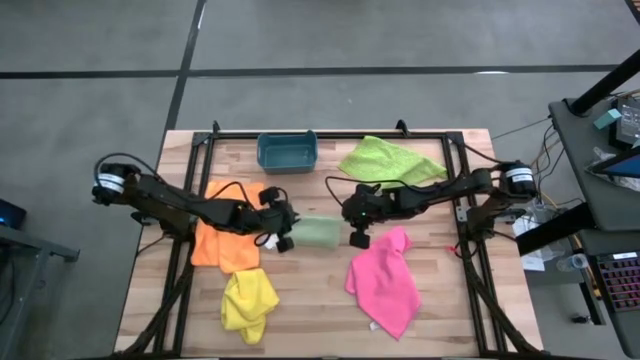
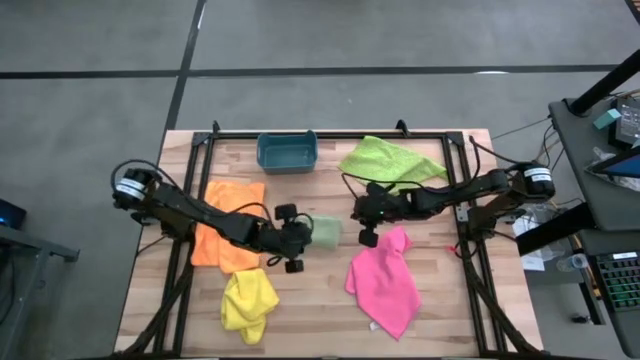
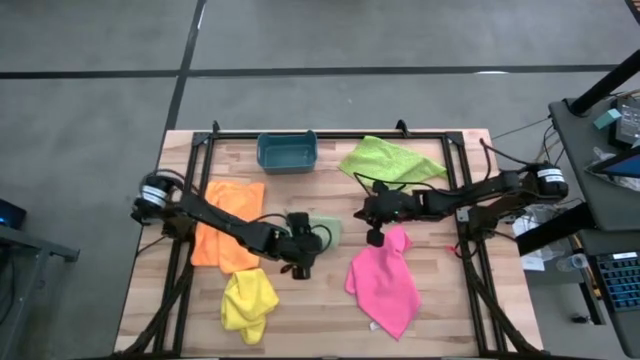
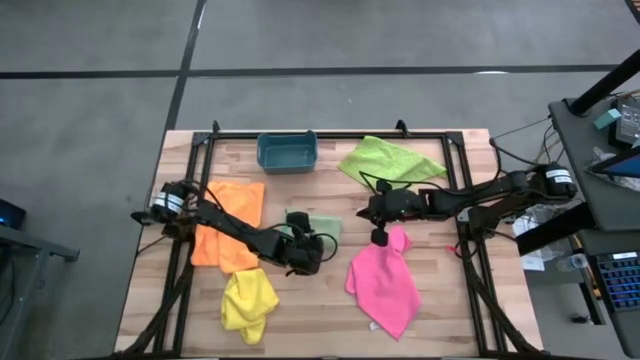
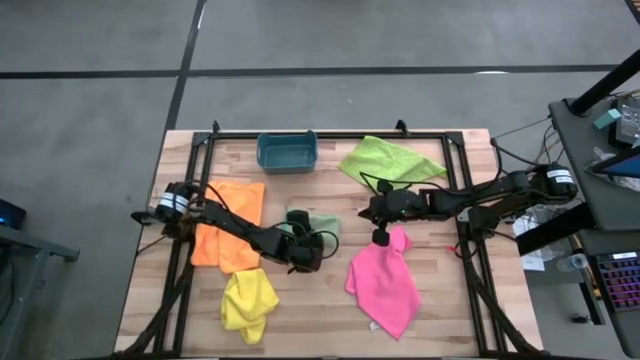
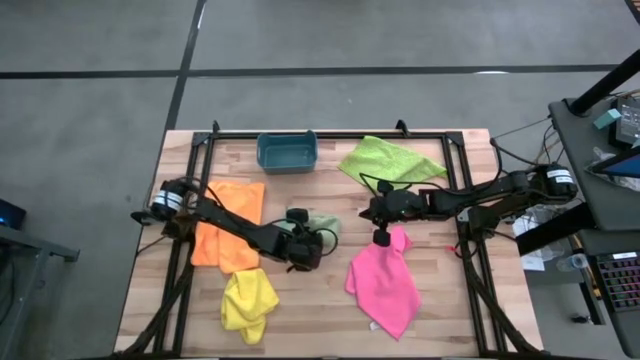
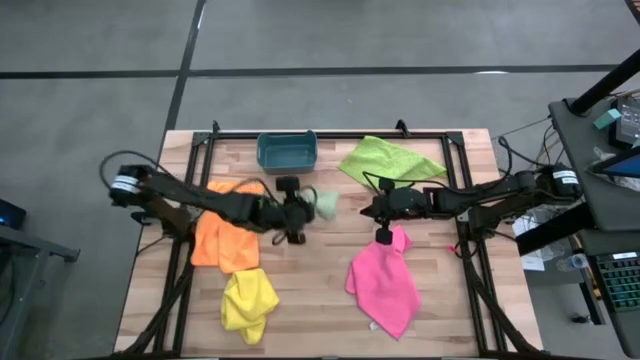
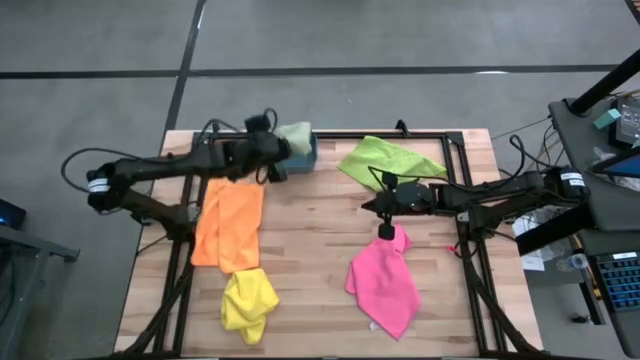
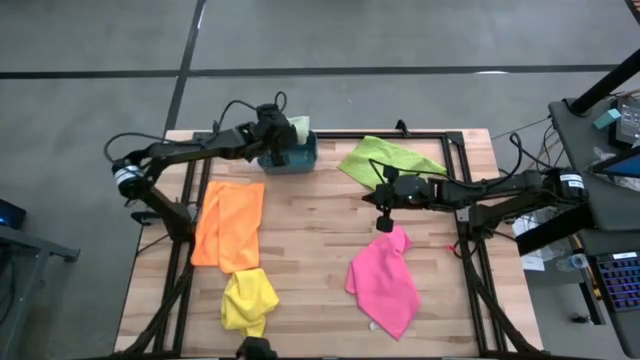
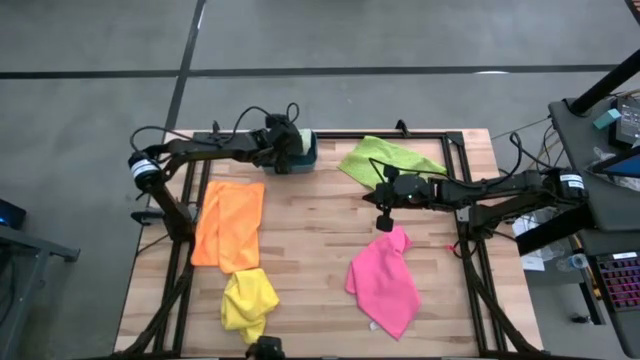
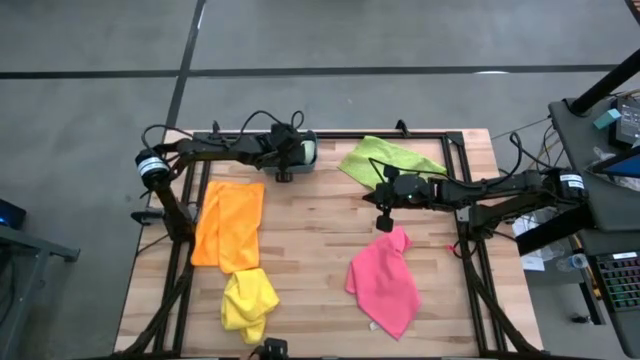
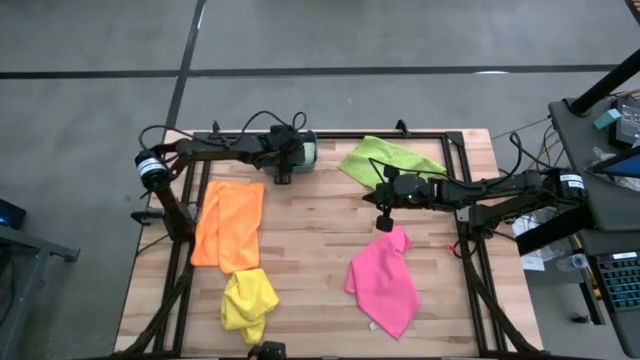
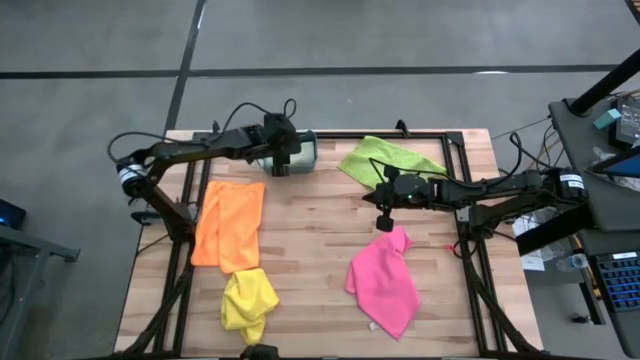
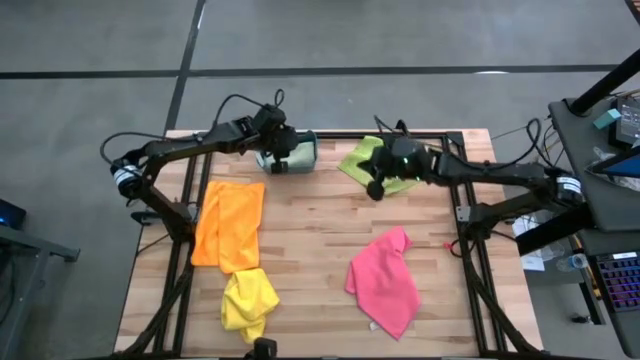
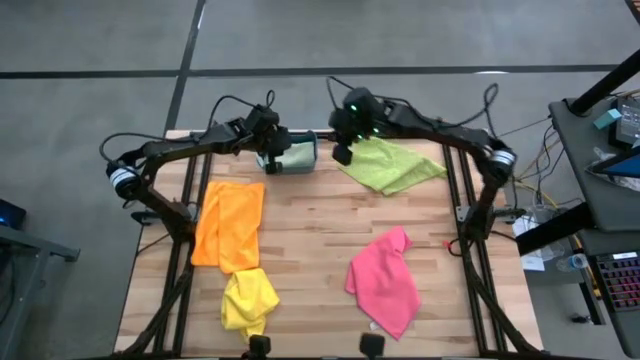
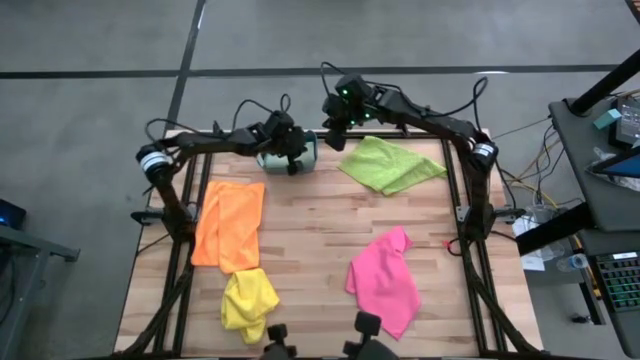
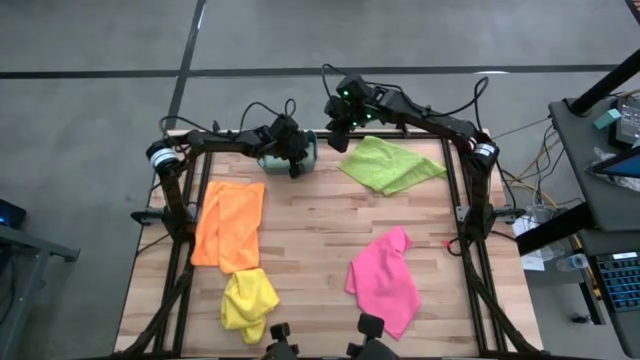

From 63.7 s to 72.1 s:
Task: Fold microfiber towels
Put the blue towel into the bin

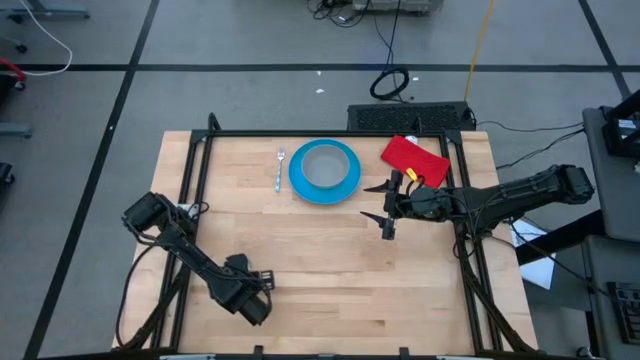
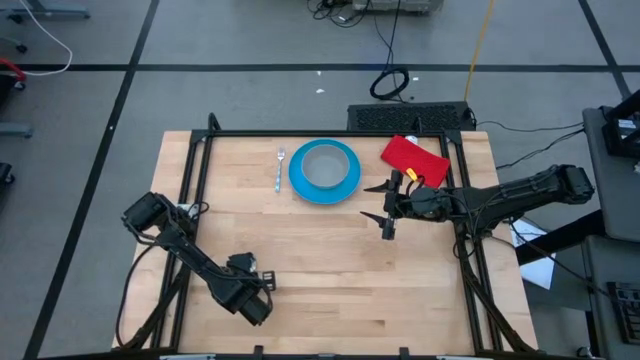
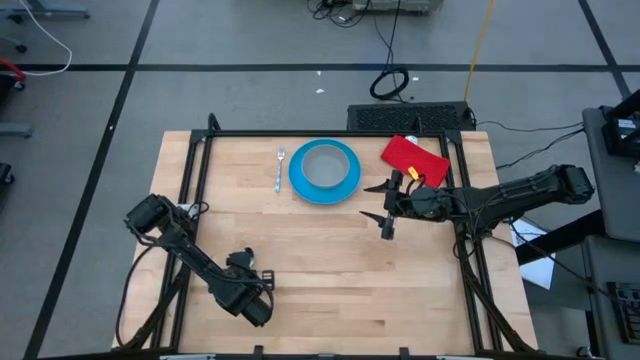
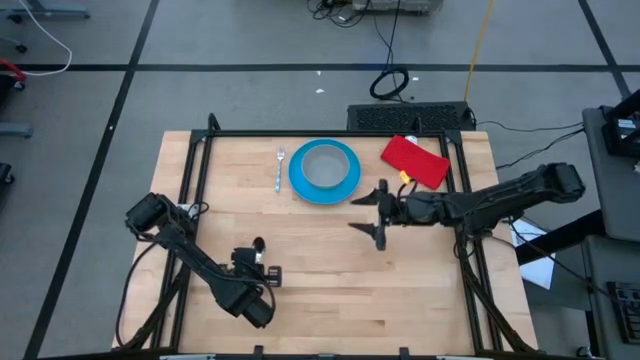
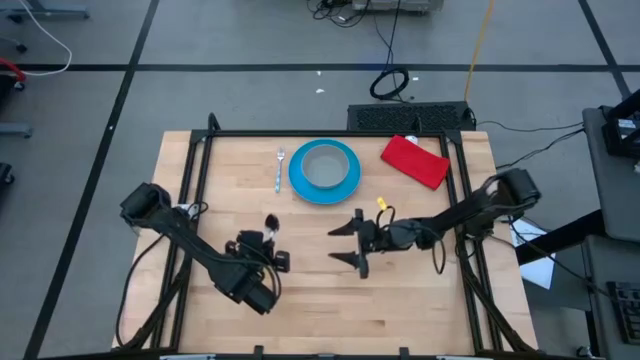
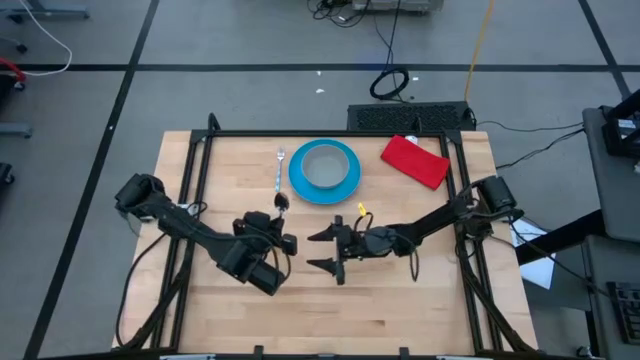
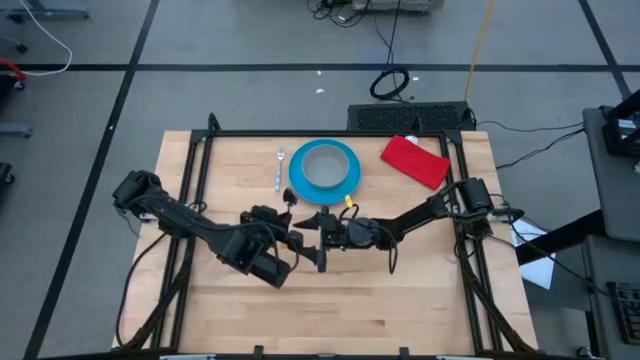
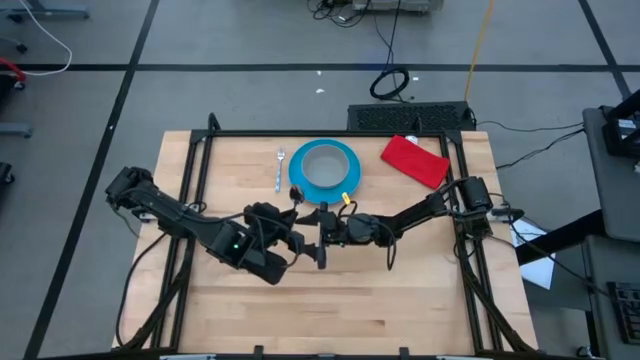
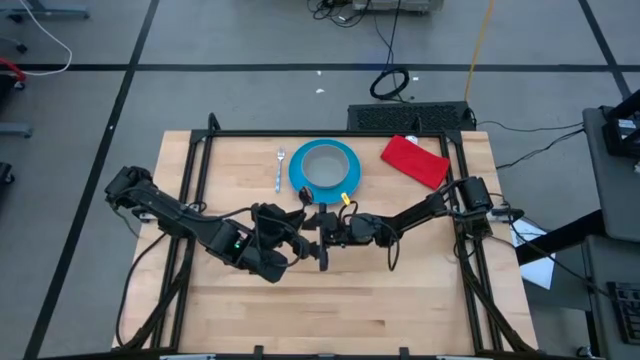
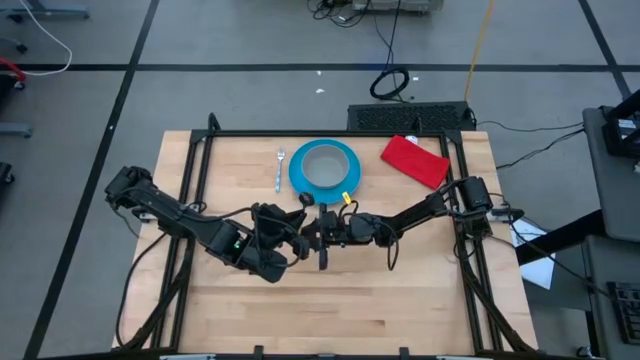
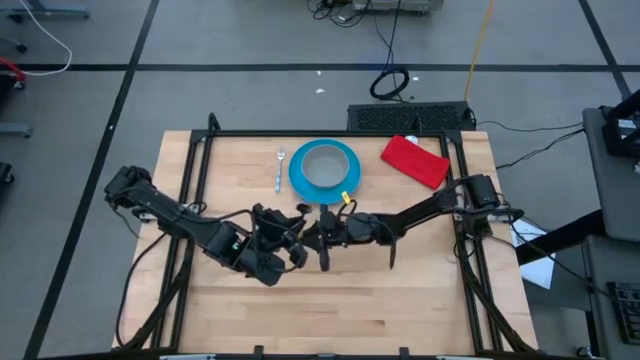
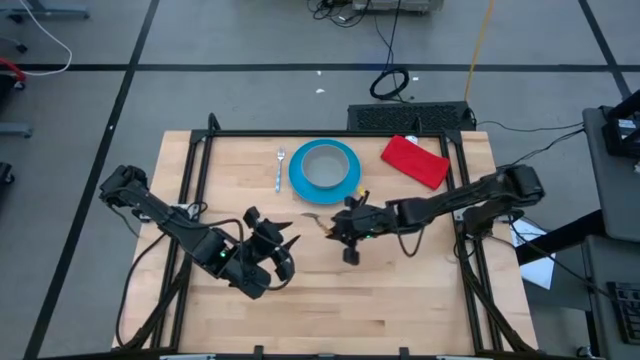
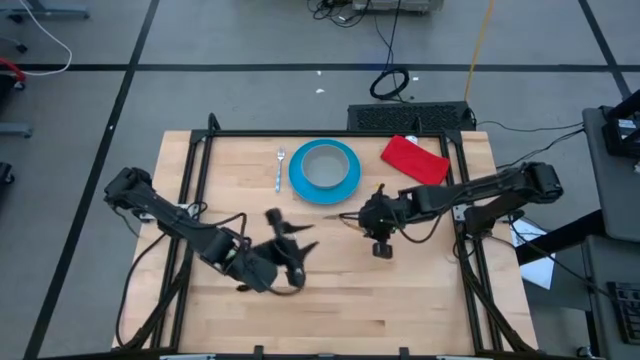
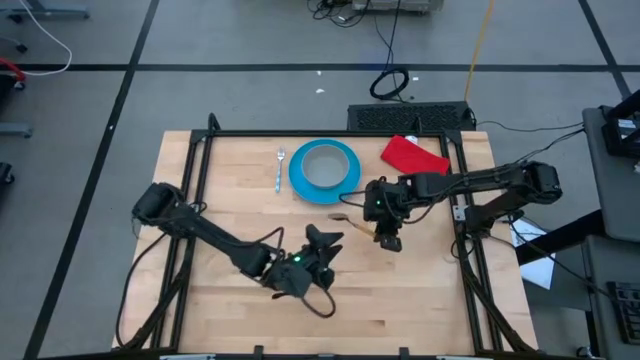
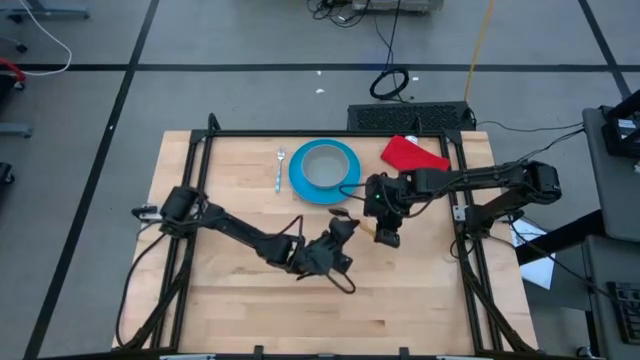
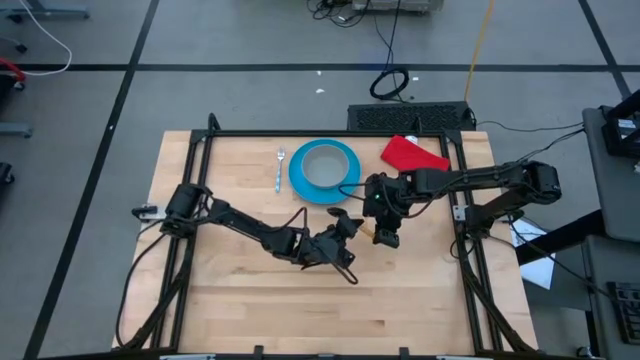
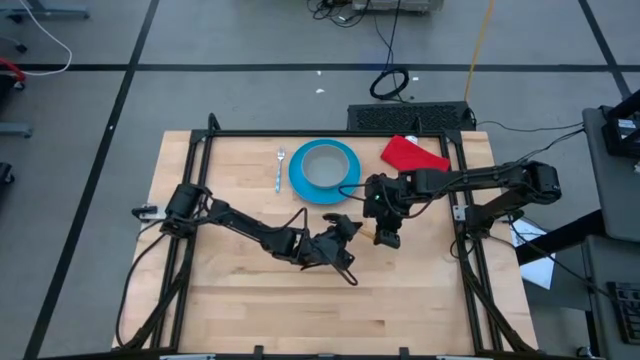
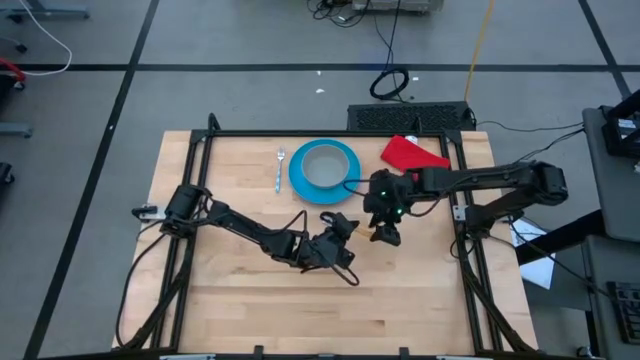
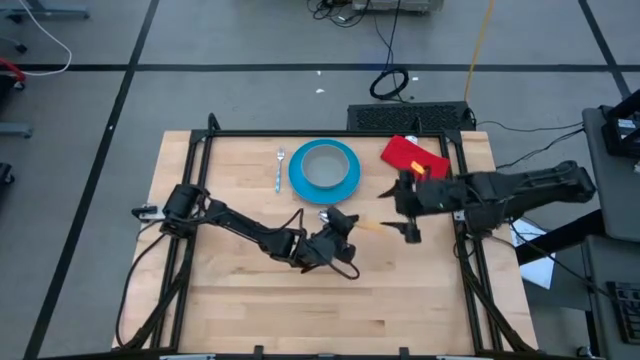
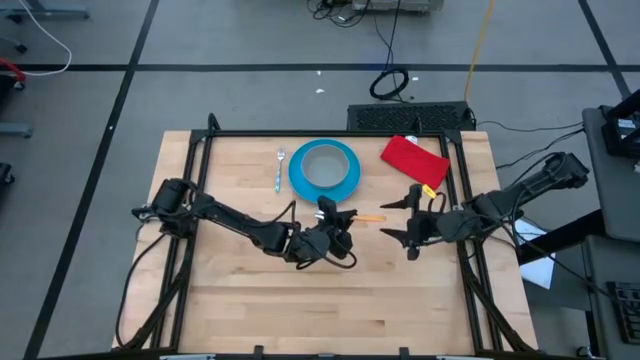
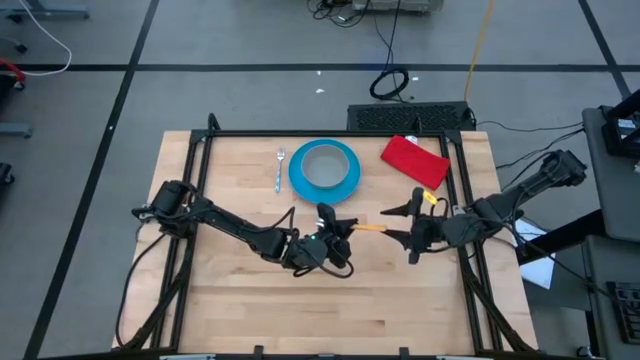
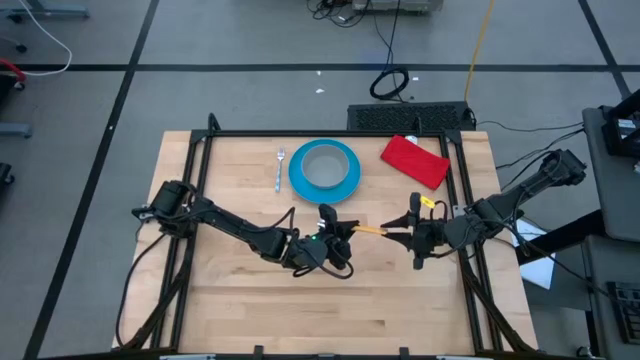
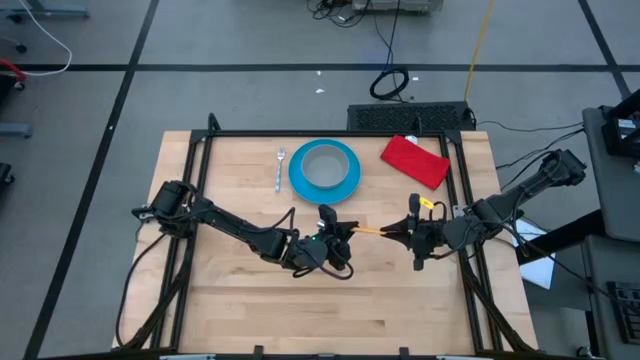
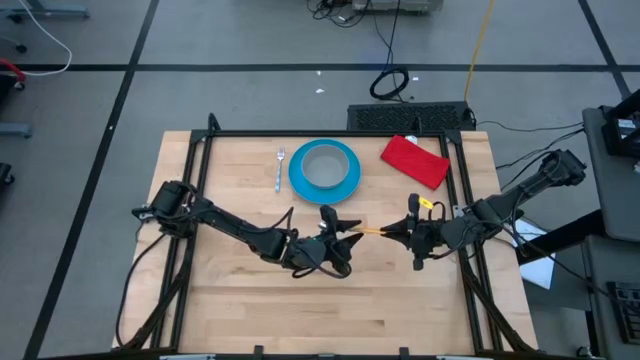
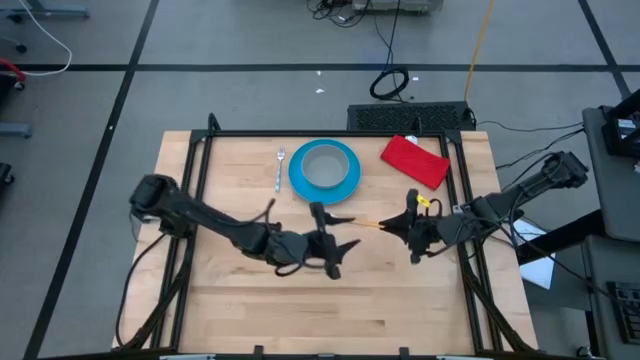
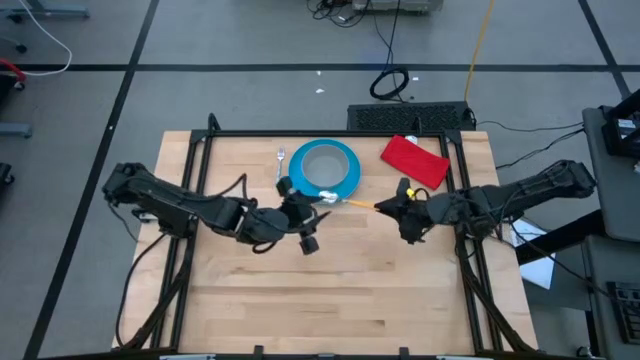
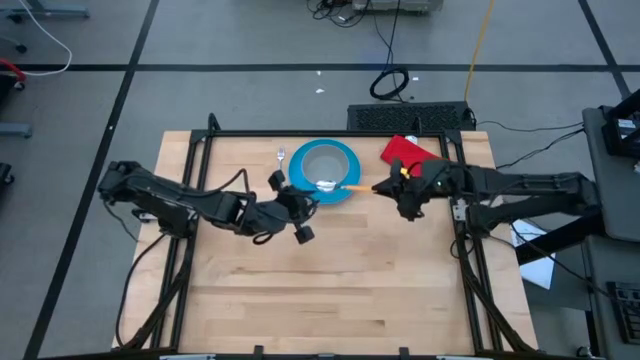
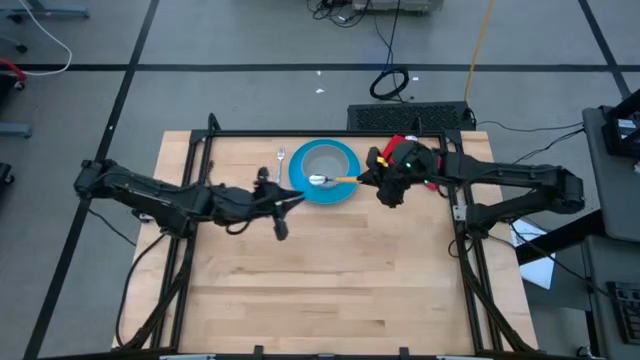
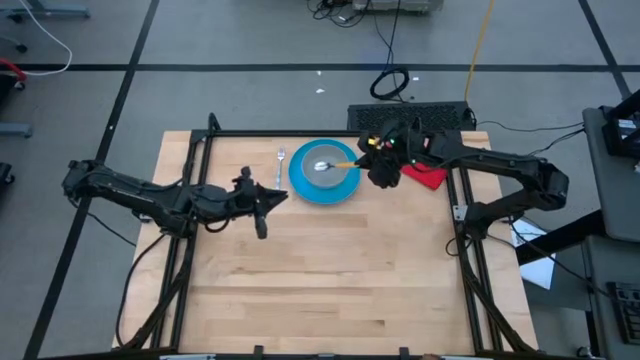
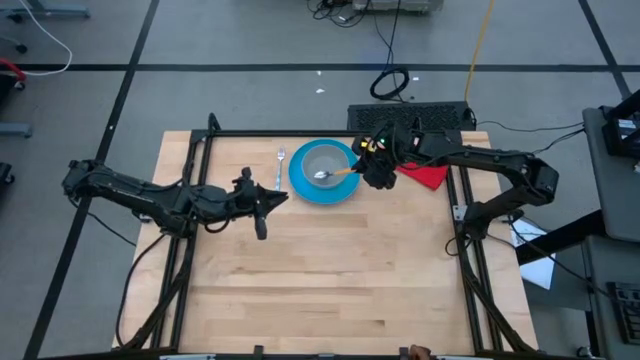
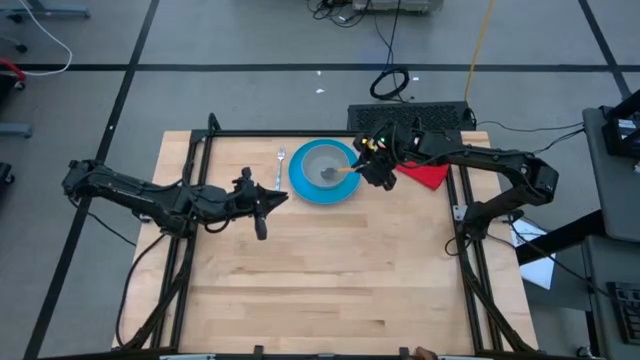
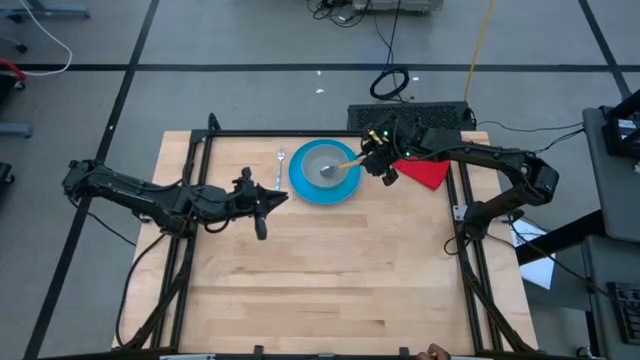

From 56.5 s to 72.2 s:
Task: Pick and place plate/cup/fork/spoon on tray
Put the yellow spoon into the grey bowl
